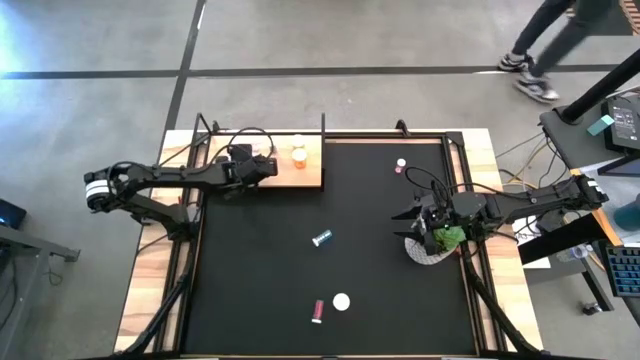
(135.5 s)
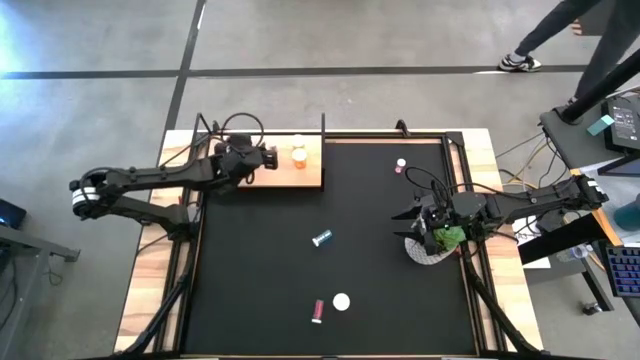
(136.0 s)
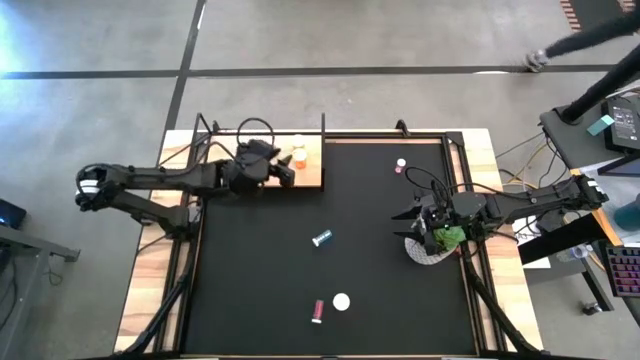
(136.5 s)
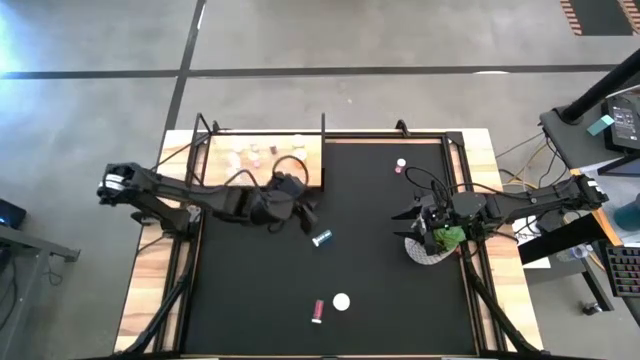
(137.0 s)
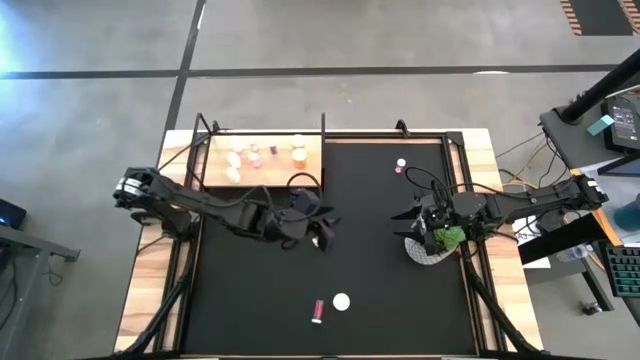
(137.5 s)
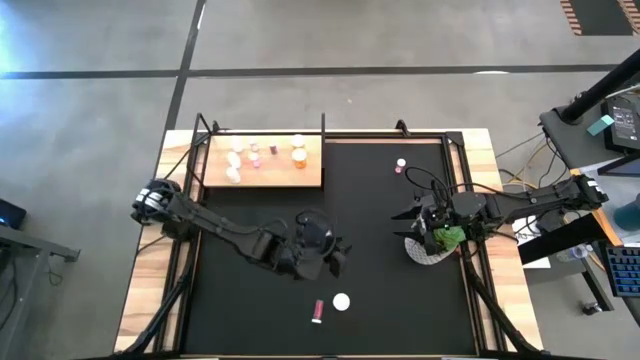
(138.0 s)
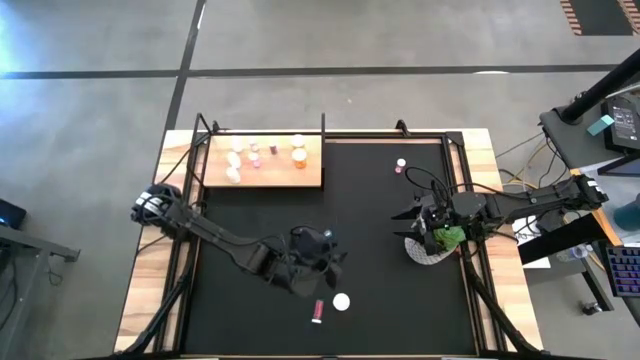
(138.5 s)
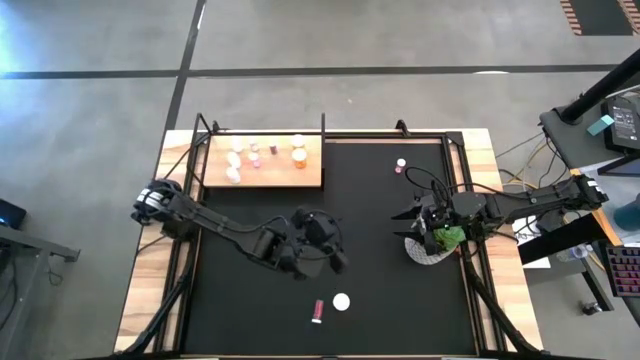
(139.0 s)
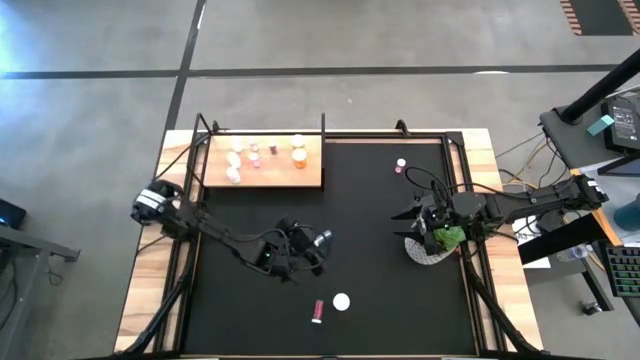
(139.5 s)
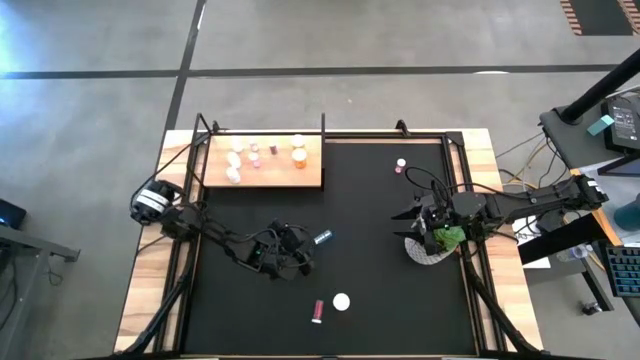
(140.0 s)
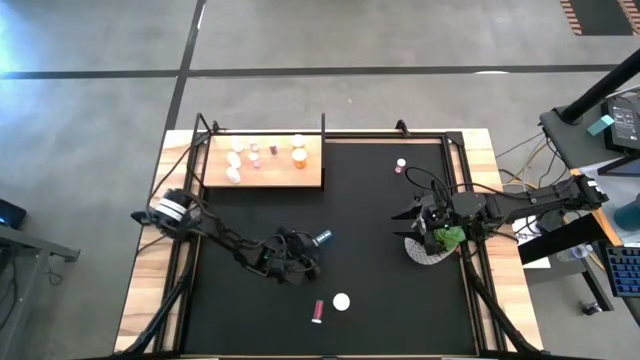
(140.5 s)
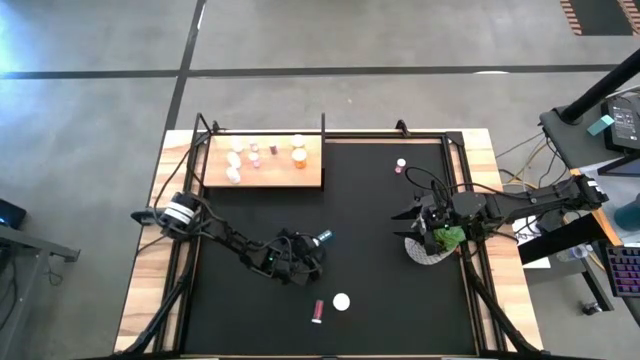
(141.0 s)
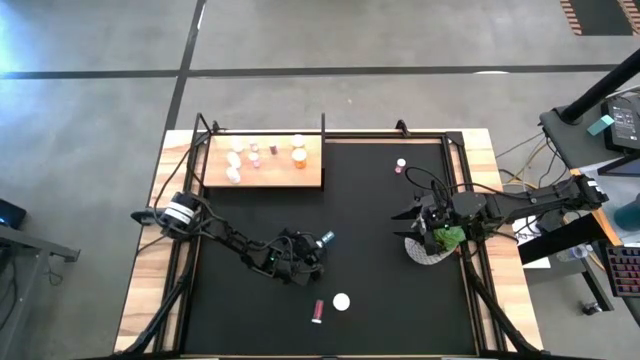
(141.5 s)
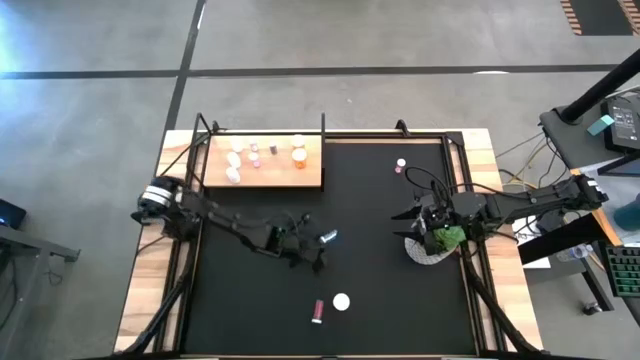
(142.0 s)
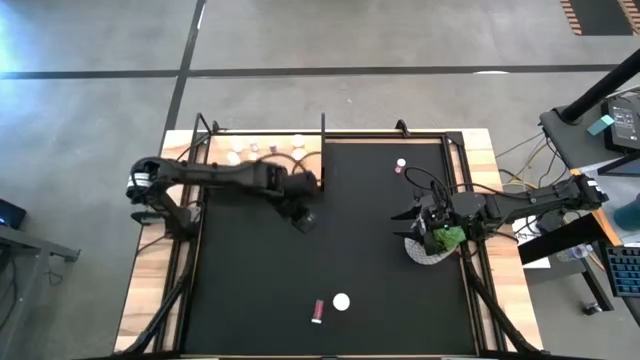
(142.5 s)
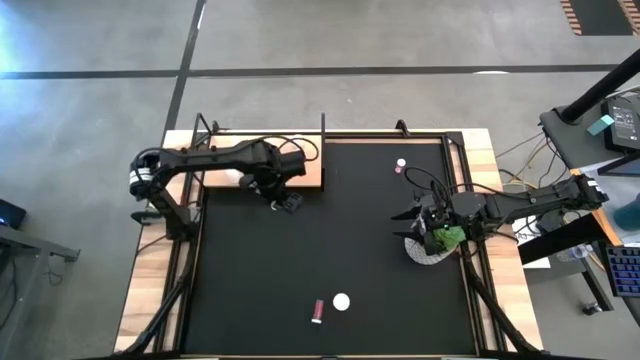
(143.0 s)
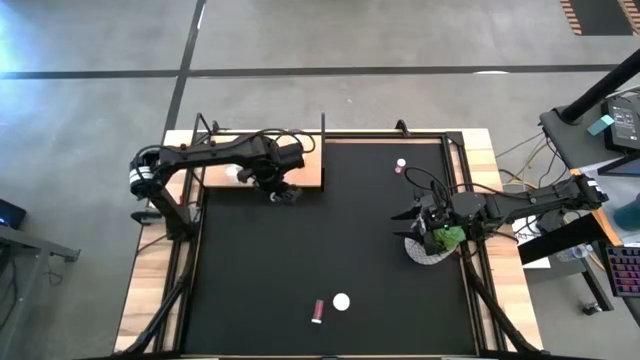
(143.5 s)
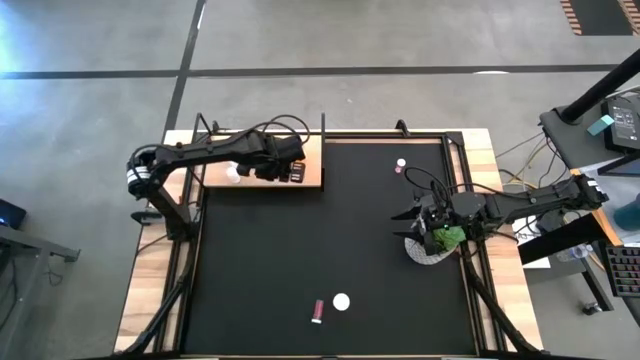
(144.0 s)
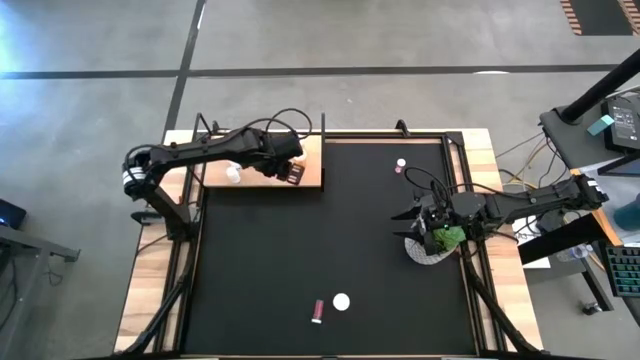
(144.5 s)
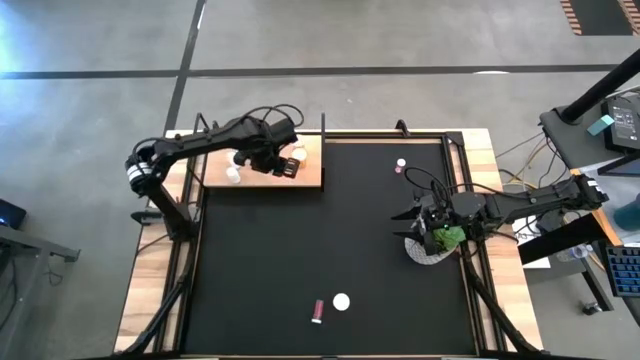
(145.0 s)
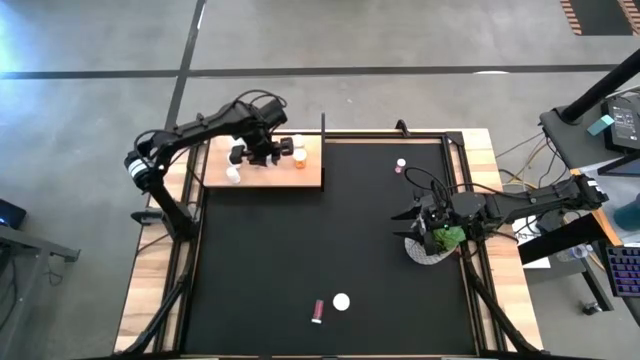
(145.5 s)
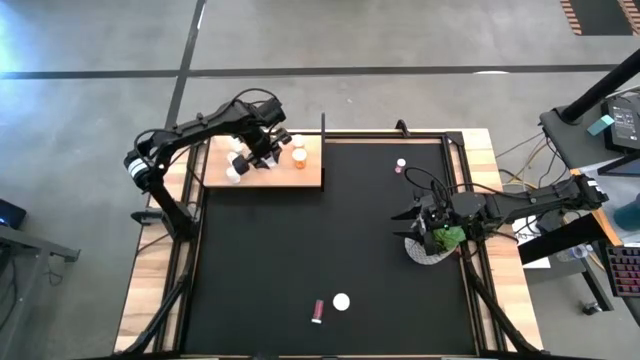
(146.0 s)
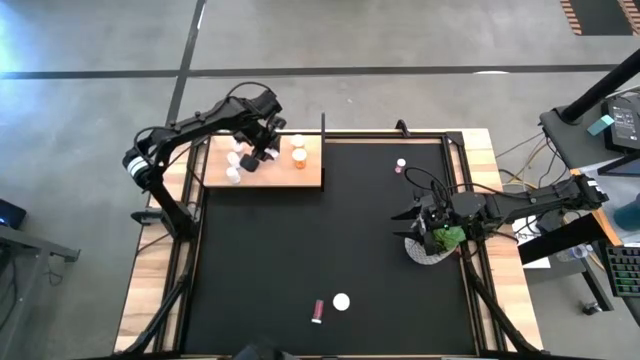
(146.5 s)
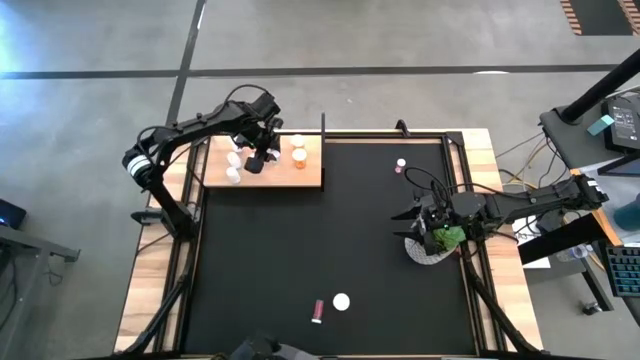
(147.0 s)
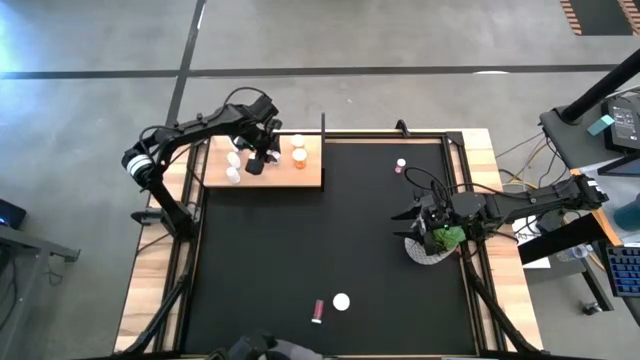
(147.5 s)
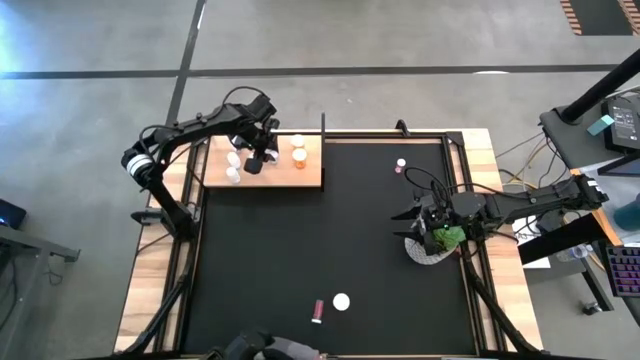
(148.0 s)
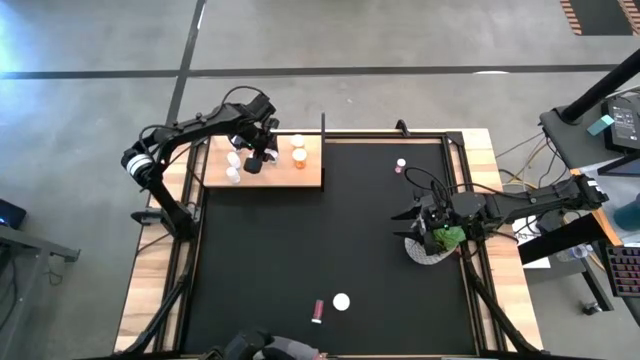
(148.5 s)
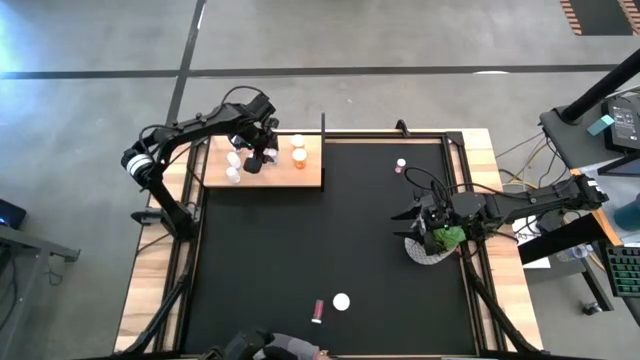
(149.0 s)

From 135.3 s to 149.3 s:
Task: Pick and place medicine bottles onto shelf by color
Put the blue pill bottle into the shelf

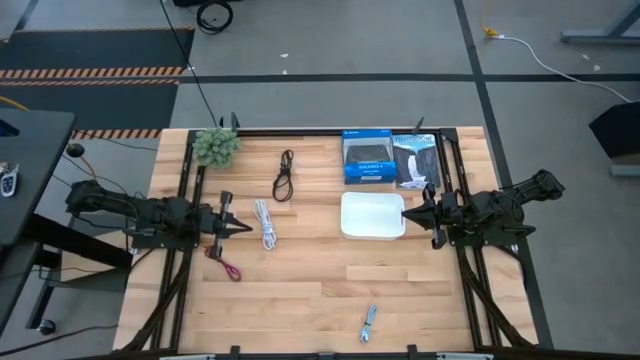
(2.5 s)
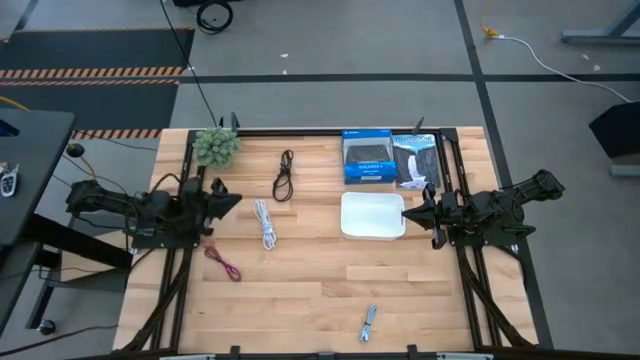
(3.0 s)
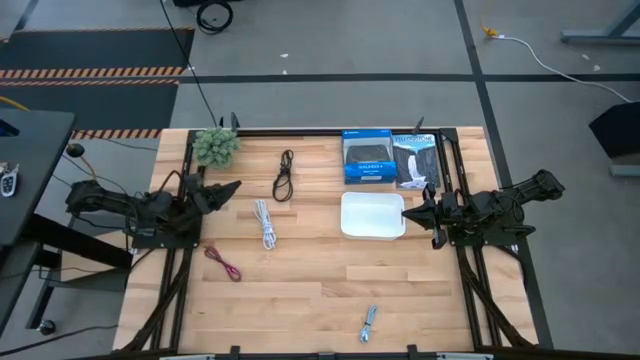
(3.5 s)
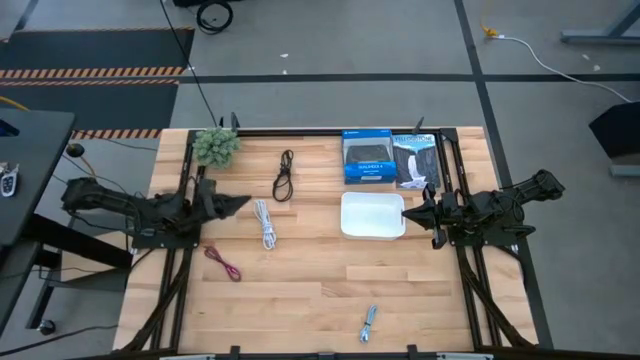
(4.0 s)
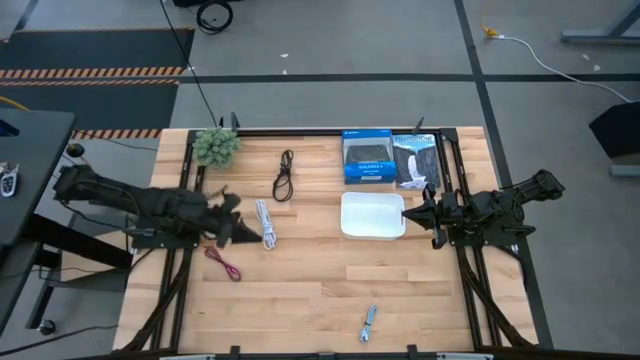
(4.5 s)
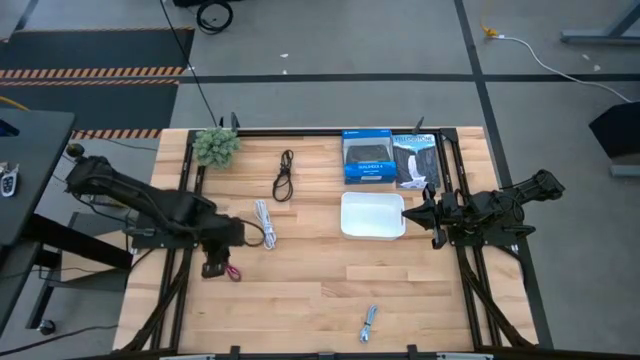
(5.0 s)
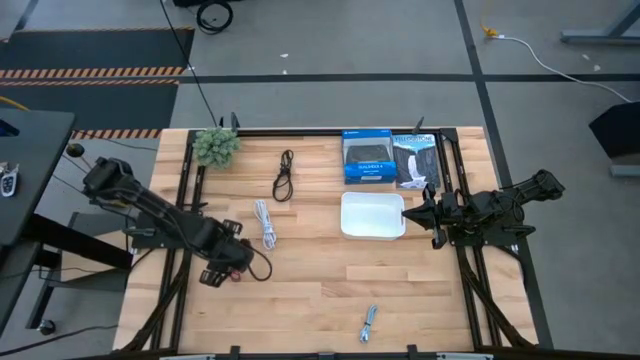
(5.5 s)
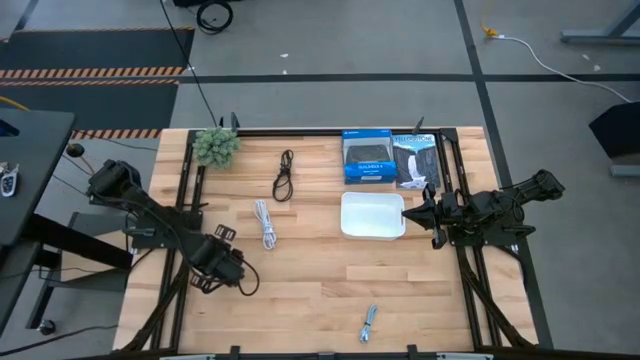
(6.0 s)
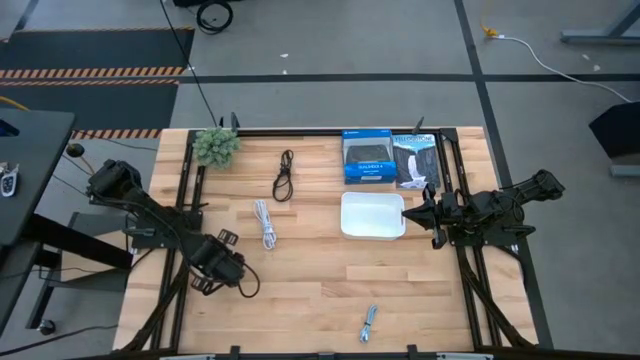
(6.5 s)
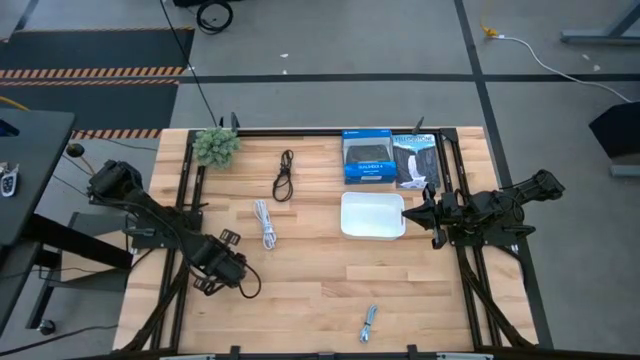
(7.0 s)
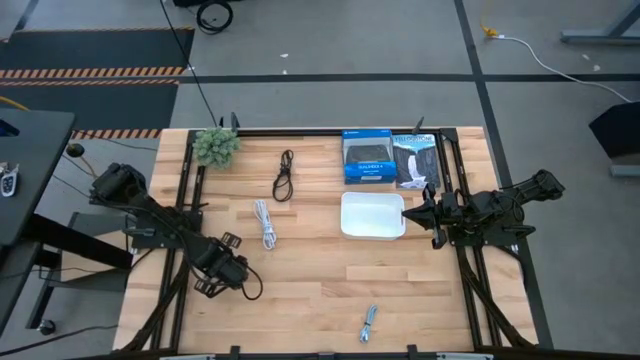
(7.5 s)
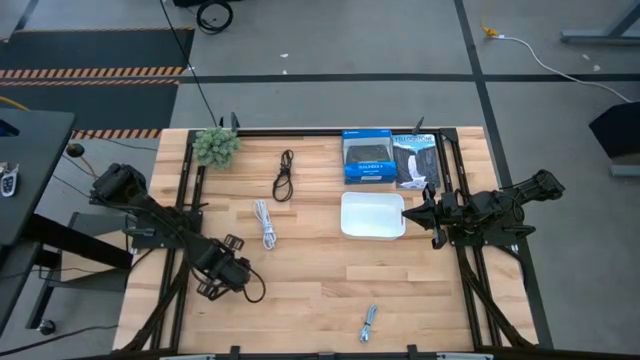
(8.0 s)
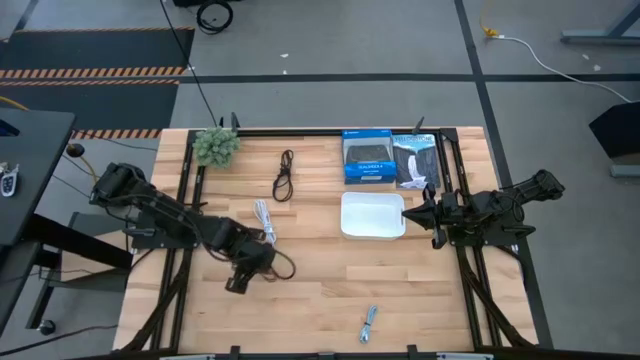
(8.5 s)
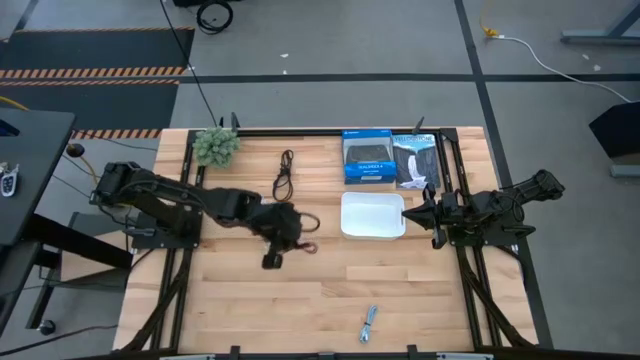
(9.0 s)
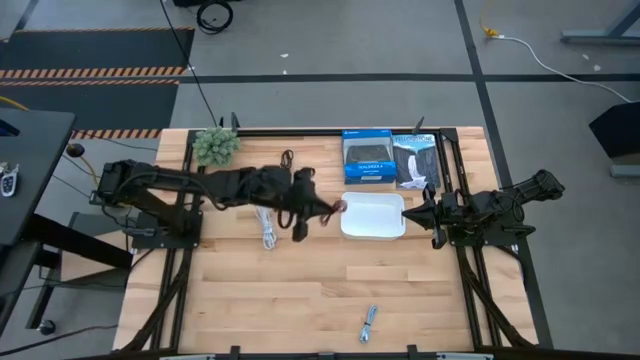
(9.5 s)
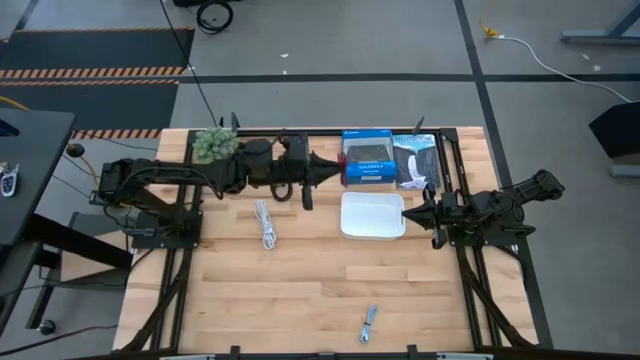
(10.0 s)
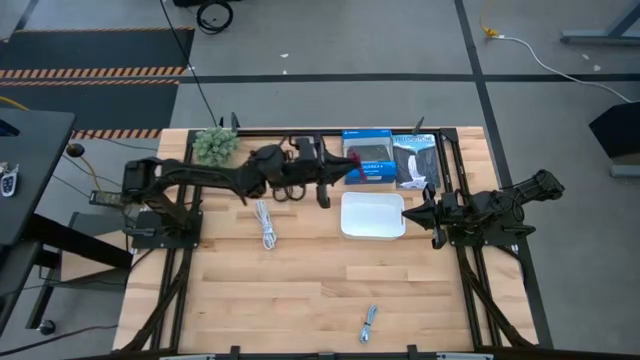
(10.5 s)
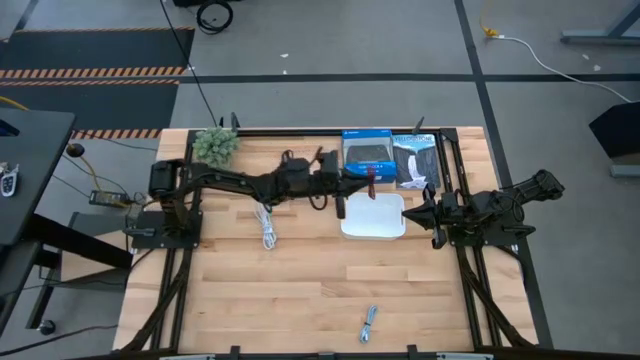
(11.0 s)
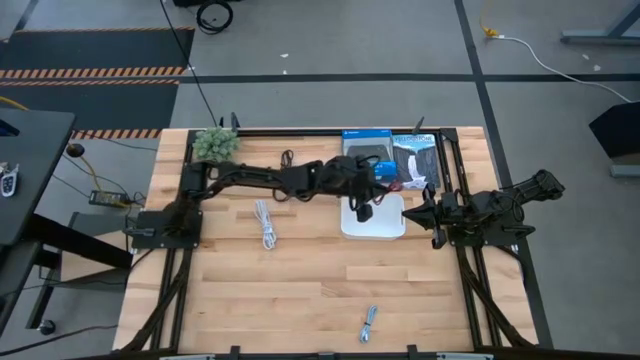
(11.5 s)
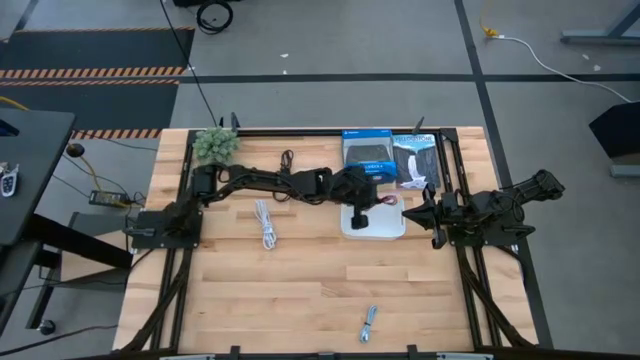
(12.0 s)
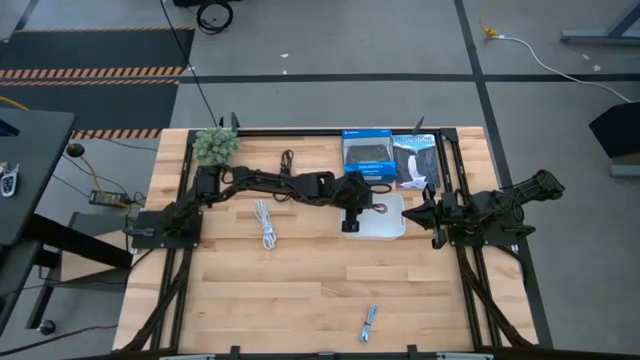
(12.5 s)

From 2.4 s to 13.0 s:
Task: Pick and place USB-C Cables
Put the pink charger cable into the white bin
